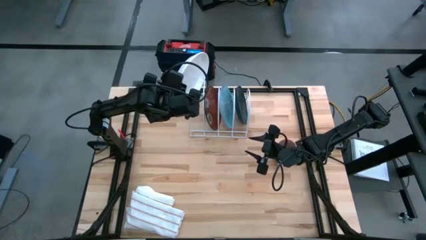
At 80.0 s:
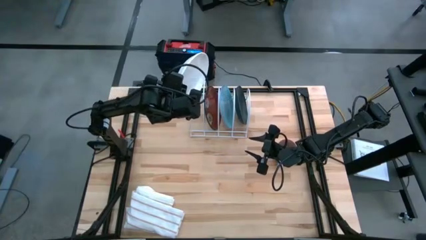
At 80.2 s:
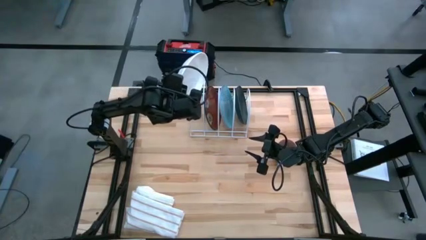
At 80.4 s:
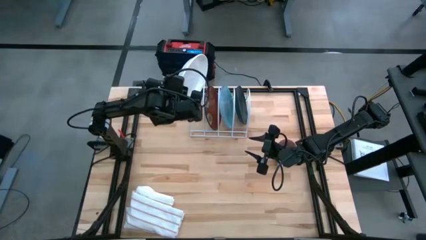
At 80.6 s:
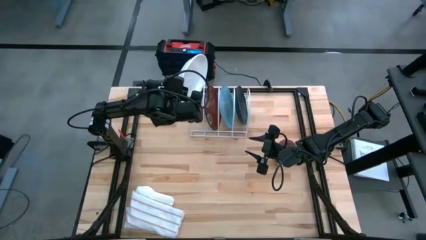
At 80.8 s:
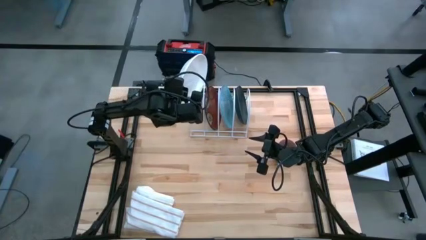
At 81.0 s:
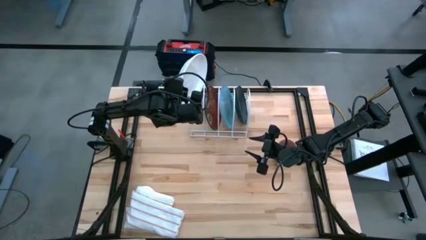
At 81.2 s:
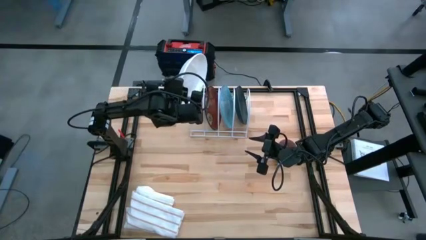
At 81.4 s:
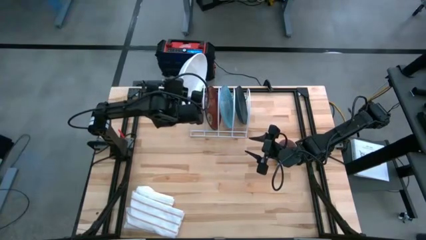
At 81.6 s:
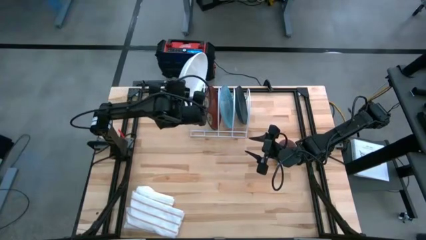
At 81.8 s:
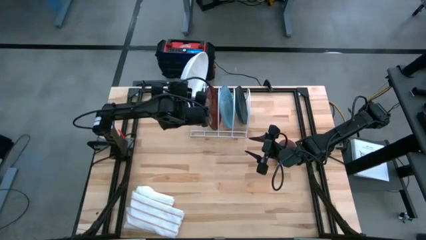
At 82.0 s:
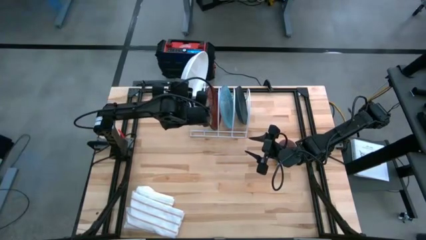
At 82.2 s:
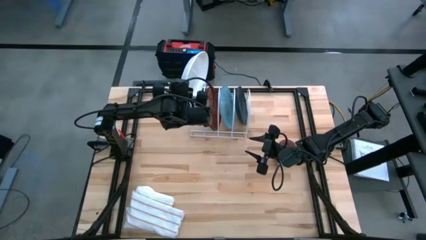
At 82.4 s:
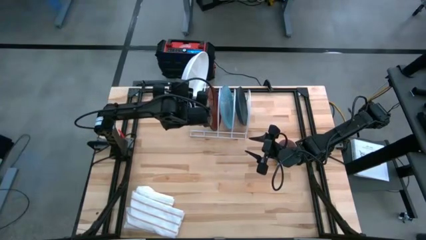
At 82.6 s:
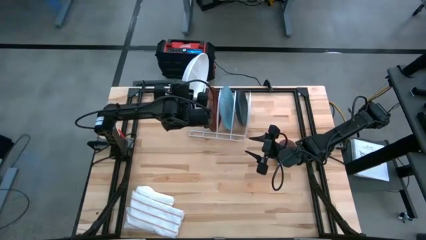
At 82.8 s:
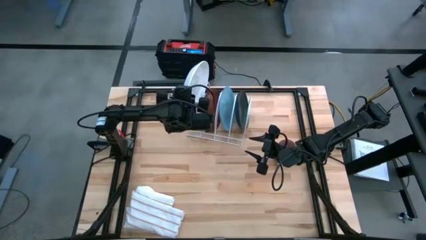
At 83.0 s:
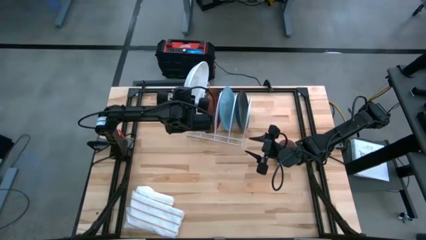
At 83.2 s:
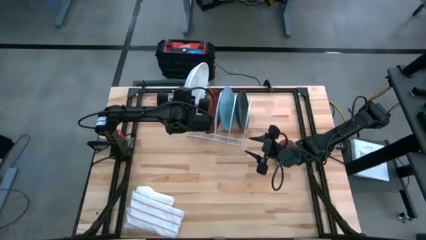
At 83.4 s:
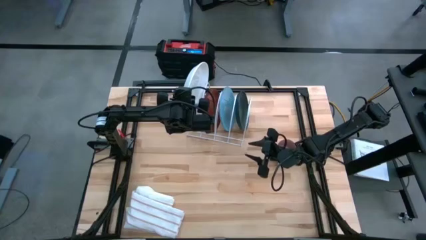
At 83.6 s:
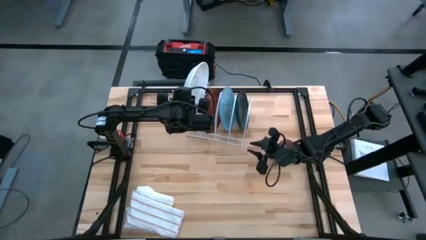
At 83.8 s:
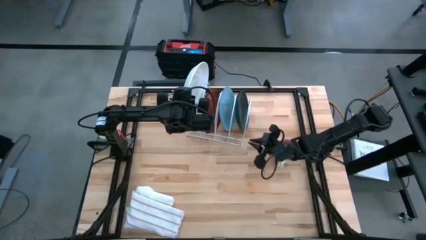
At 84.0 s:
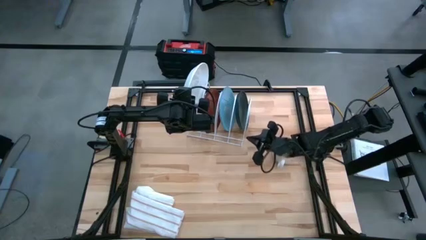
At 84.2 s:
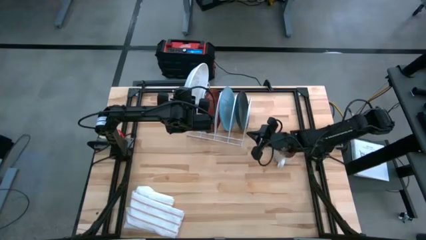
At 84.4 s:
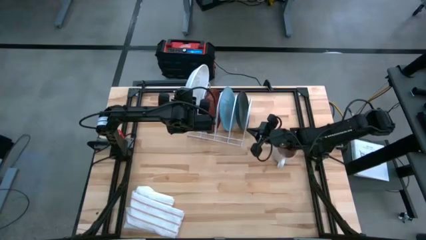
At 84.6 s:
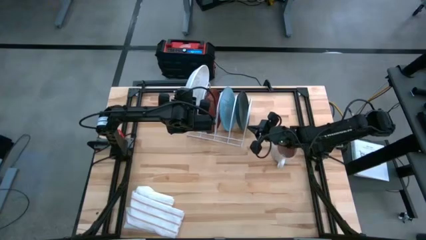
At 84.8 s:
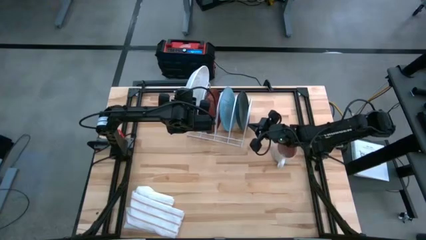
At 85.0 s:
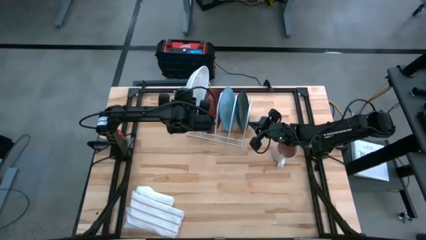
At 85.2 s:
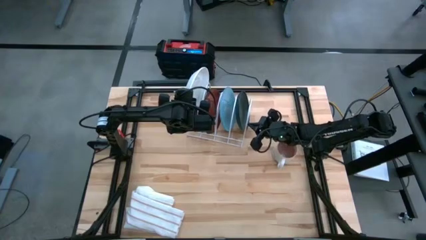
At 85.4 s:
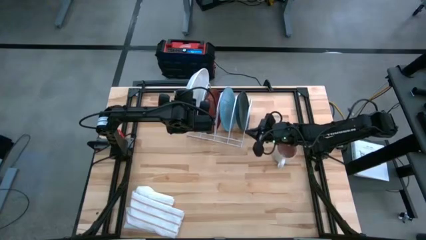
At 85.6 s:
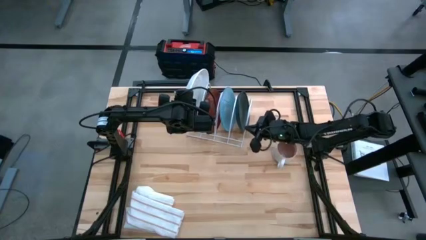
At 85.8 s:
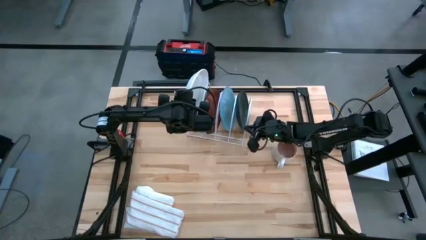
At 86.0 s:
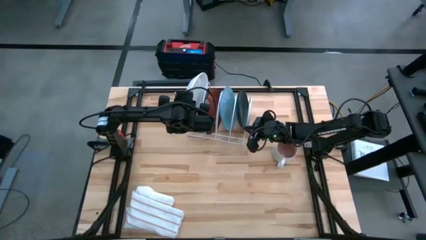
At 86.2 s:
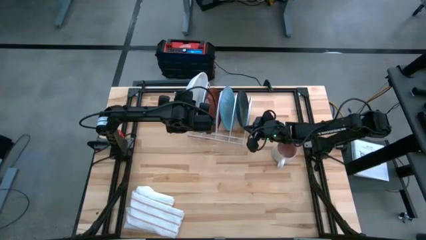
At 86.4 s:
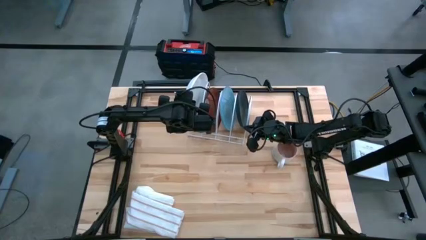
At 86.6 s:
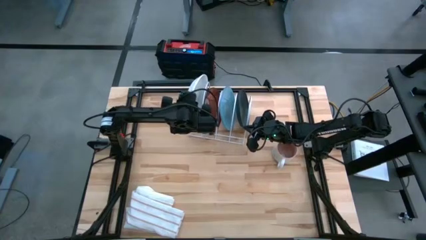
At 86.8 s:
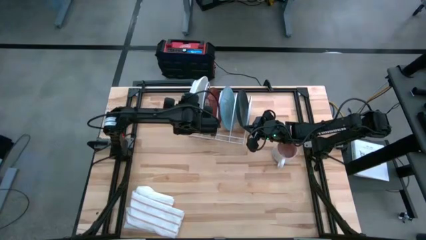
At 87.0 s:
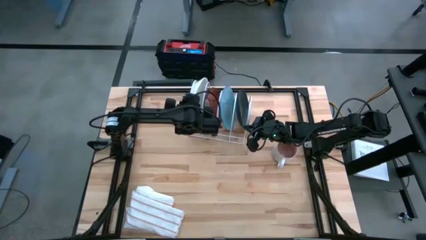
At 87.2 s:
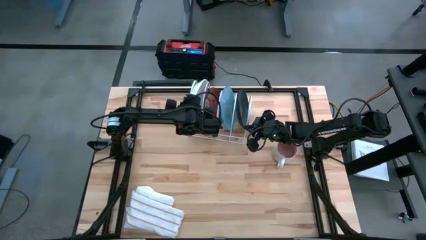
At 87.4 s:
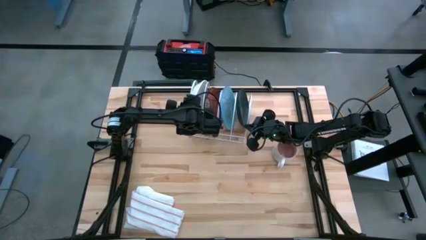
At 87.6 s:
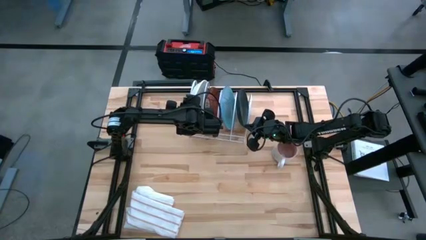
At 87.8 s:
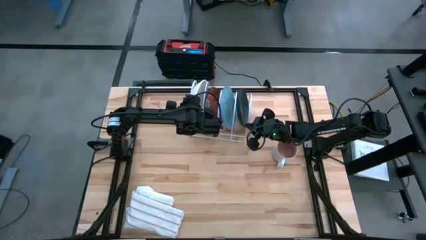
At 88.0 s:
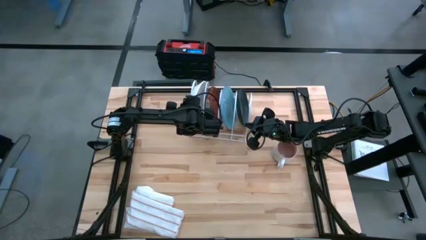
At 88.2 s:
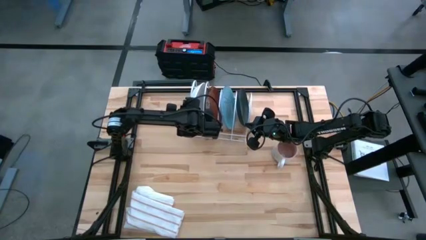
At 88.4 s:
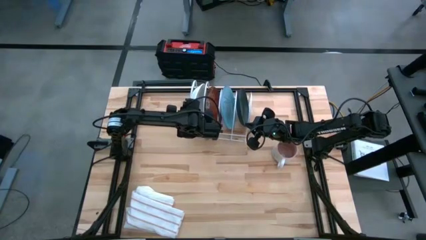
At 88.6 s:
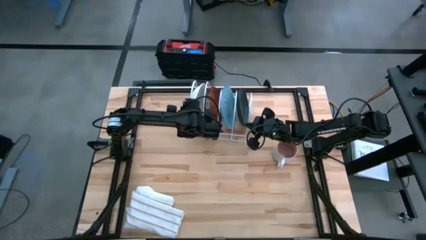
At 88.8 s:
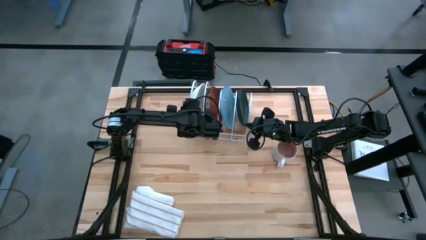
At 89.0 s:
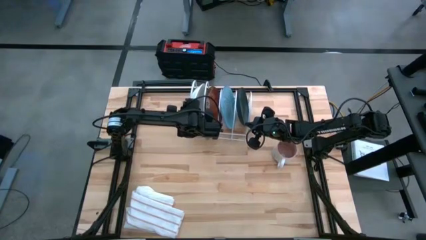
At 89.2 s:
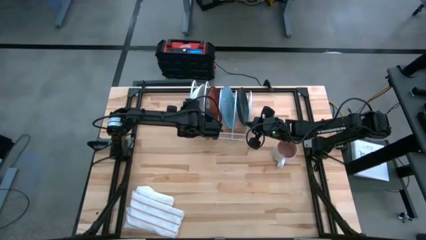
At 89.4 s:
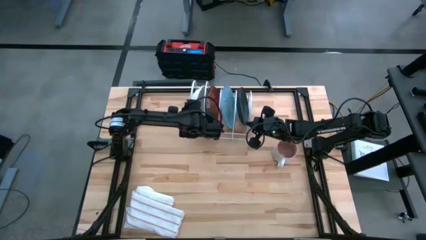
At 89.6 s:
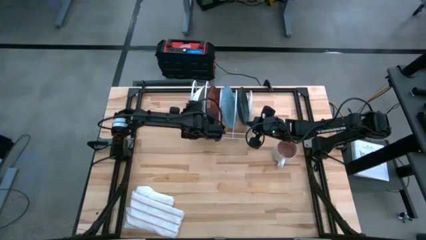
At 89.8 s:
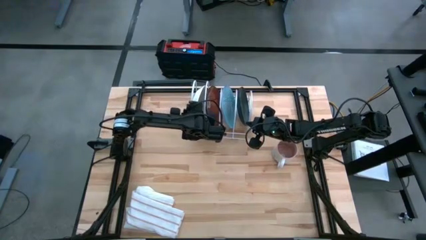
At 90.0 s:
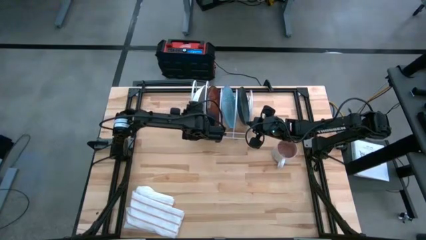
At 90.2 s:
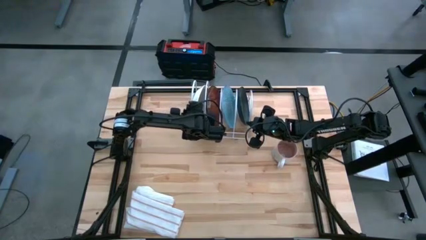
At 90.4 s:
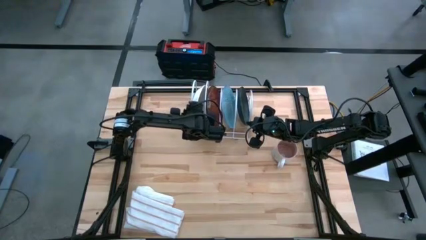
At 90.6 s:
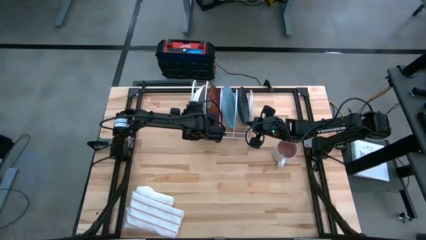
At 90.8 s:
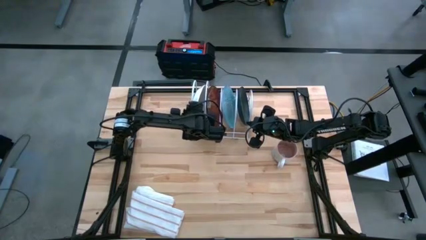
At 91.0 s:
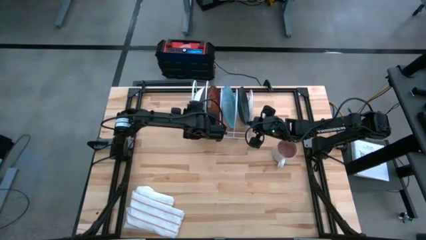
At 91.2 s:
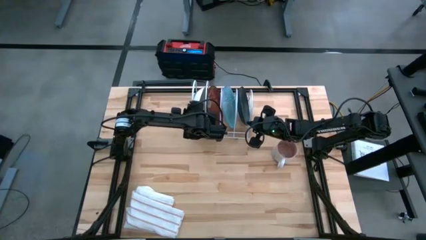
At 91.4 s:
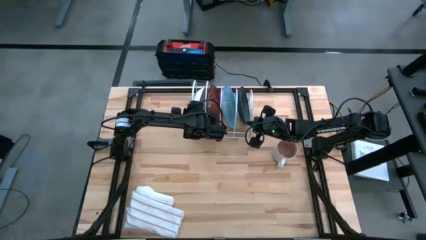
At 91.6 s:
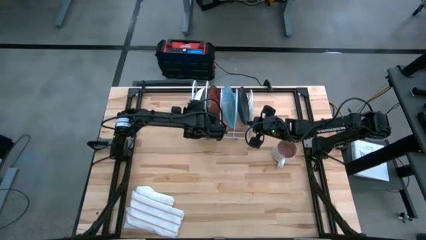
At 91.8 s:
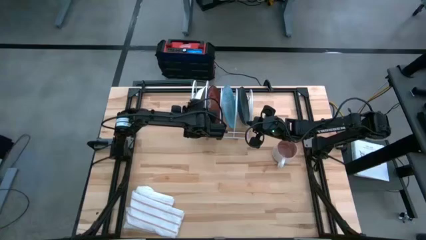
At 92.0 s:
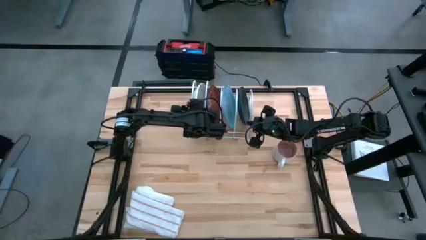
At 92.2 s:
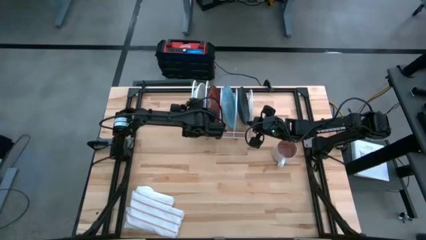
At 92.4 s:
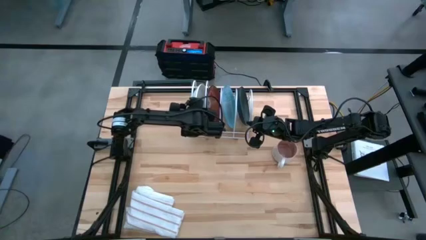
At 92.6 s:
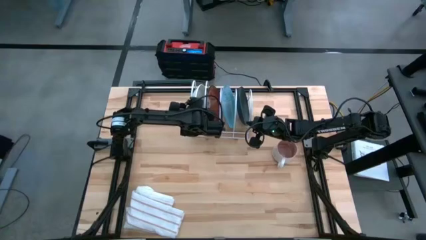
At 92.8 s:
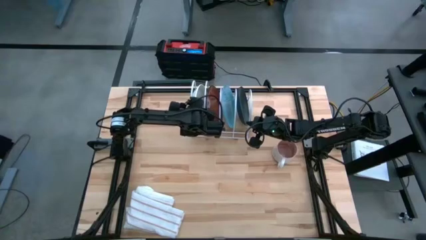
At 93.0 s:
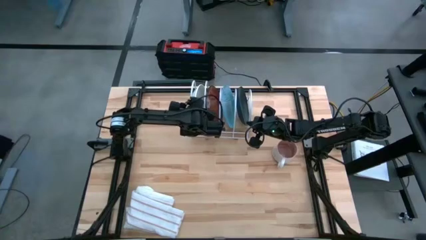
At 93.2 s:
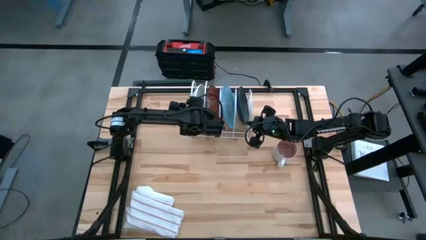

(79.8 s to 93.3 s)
Task: Sort dishes
Put the white plate in the dish rack

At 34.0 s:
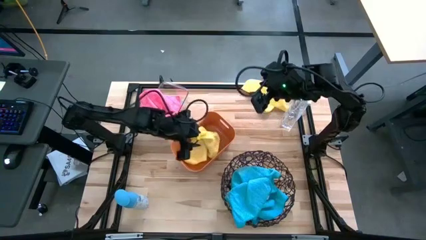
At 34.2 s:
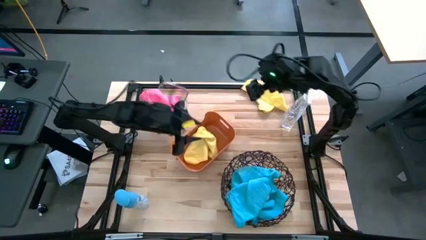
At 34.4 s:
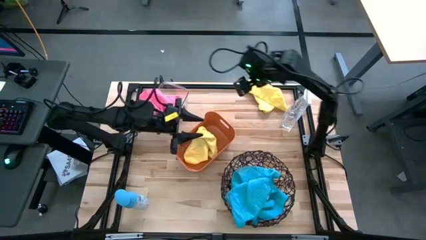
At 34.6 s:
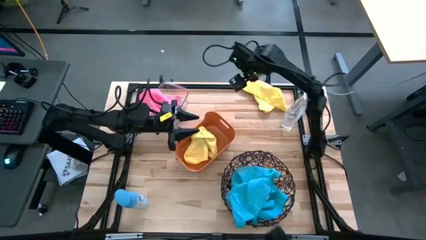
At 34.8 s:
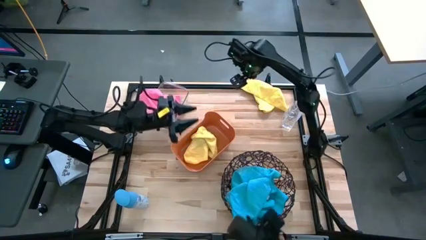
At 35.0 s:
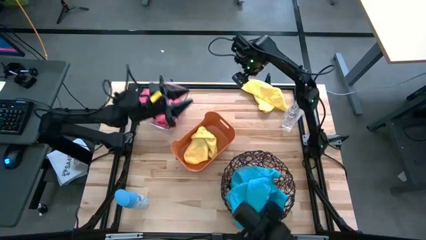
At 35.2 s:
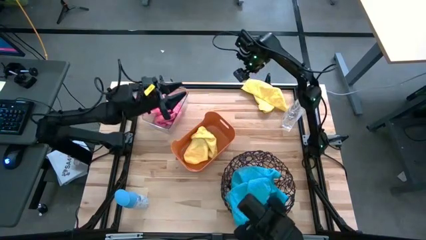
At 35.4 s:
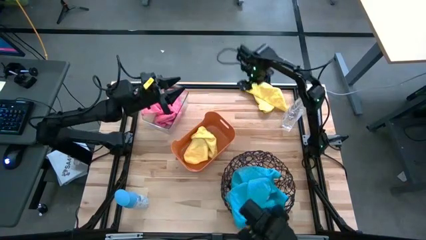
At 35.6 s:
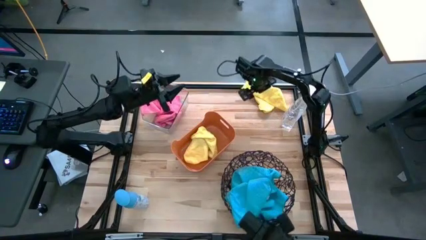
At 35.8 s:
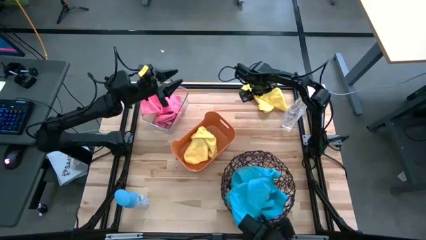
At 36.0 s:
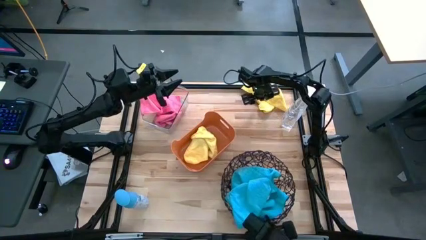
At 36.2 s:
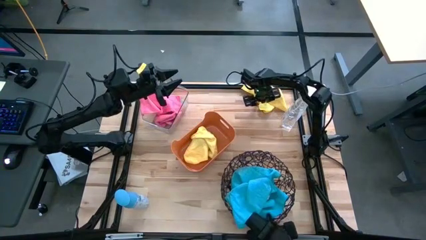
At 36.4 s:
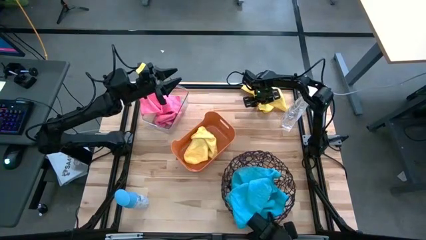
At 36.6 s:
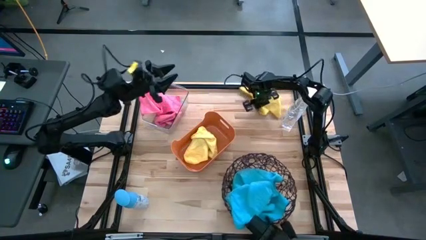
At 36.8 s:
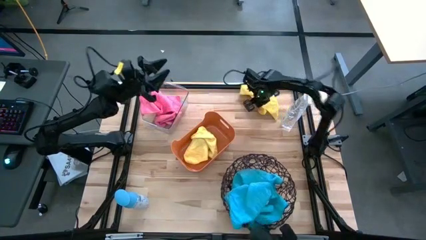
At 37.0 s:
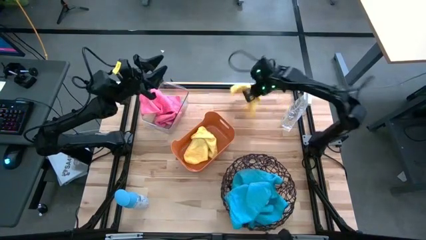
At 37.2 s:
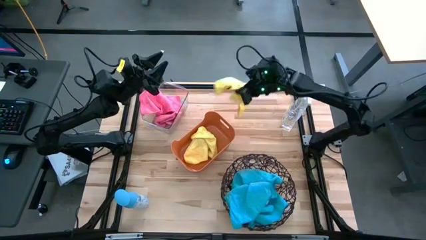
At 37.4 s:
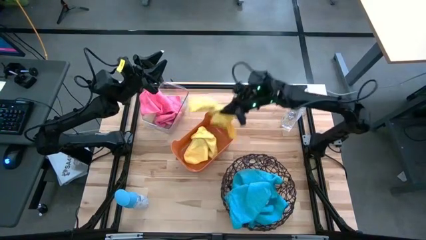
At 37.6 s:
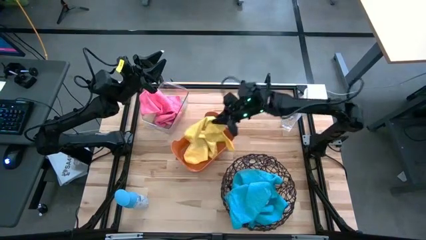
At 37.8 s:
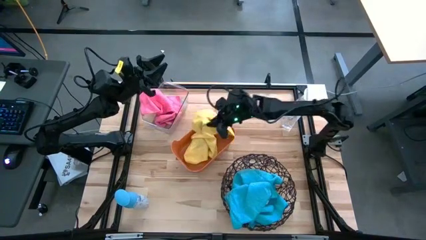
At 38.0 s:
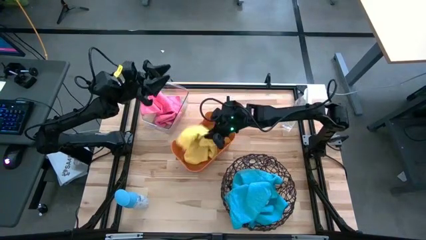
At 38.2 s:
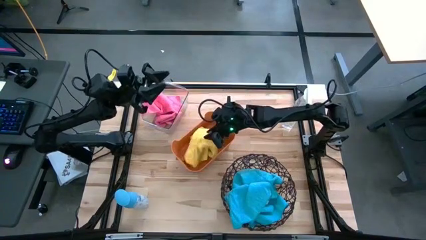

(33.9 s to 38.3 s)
Task: Sort microfiber towel by color & place in baskets
Put the yellow towel into the orange bin
